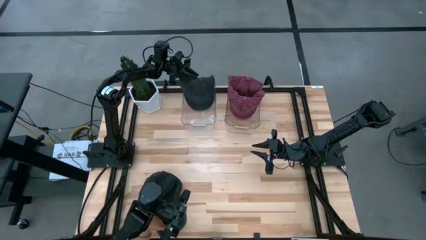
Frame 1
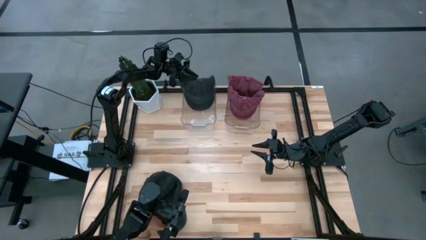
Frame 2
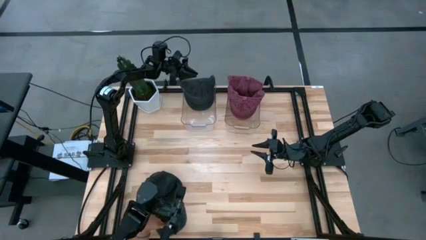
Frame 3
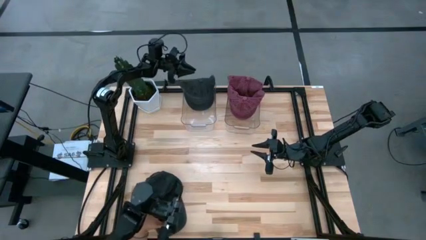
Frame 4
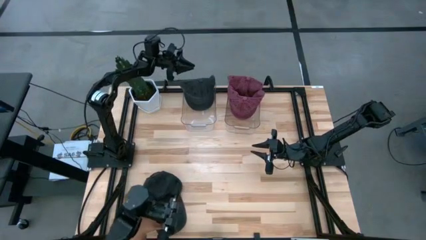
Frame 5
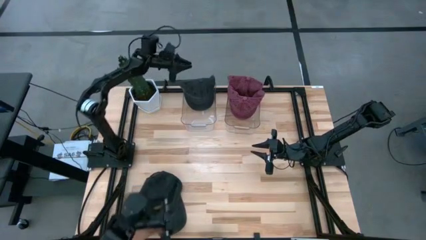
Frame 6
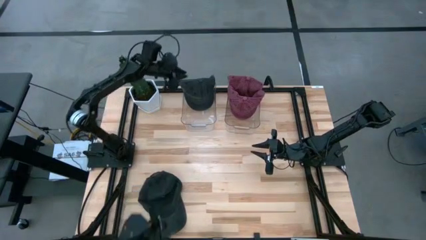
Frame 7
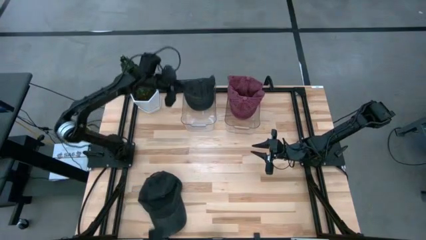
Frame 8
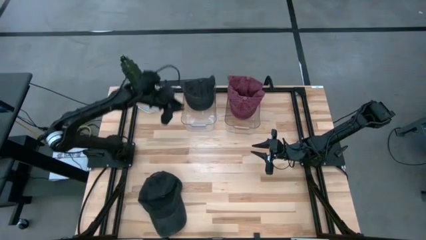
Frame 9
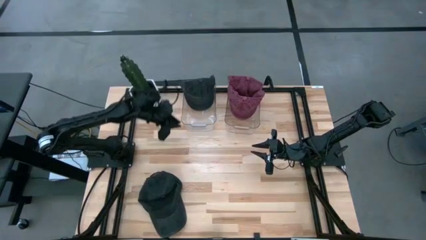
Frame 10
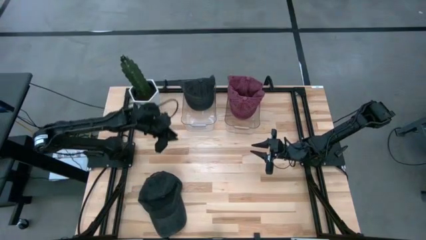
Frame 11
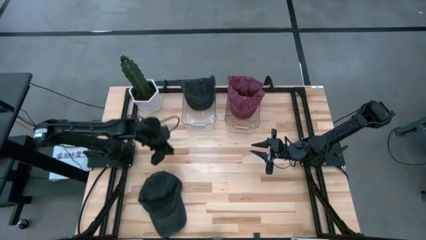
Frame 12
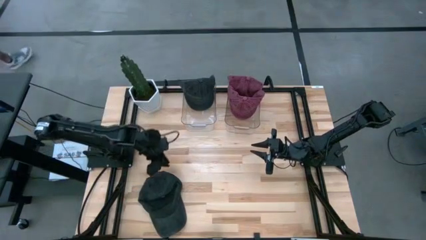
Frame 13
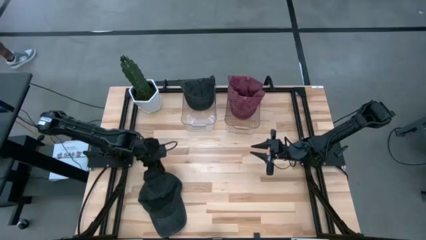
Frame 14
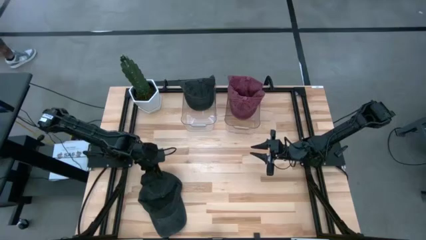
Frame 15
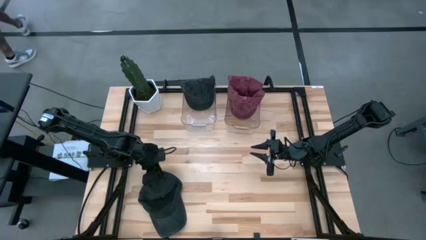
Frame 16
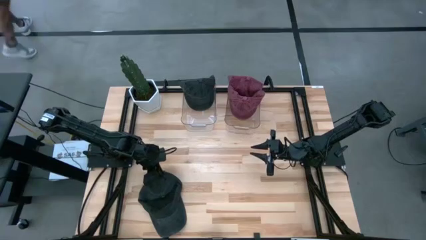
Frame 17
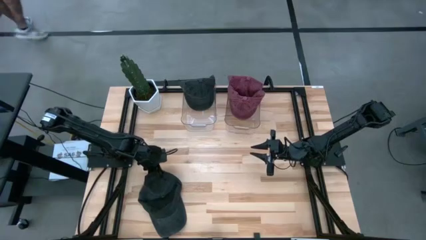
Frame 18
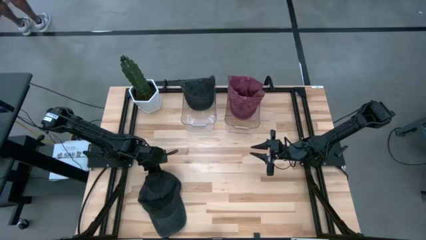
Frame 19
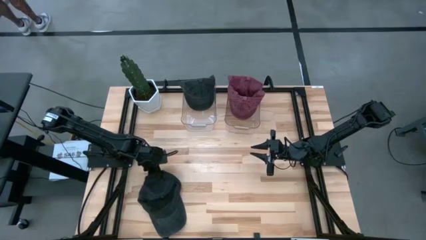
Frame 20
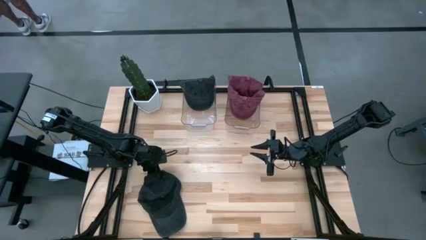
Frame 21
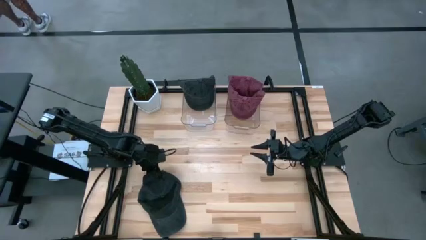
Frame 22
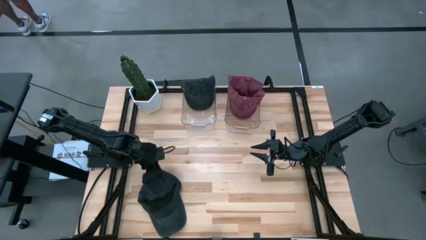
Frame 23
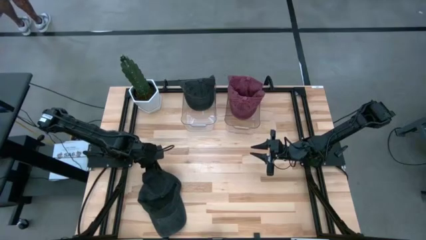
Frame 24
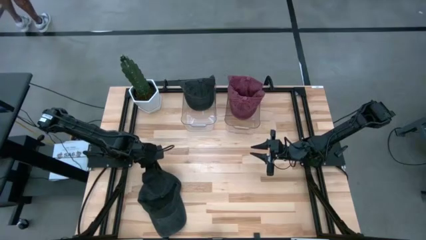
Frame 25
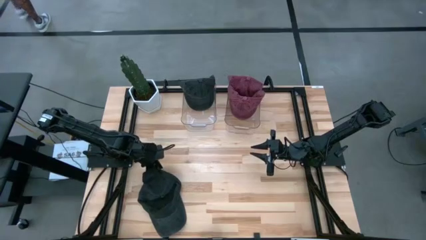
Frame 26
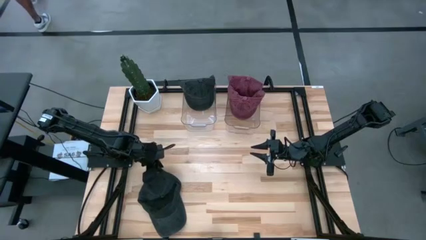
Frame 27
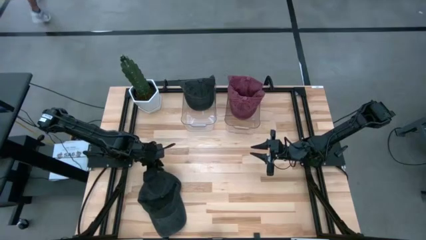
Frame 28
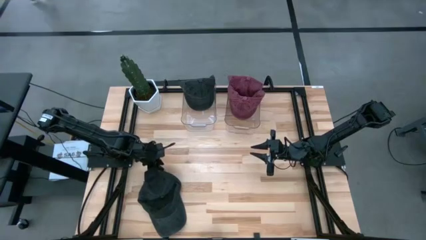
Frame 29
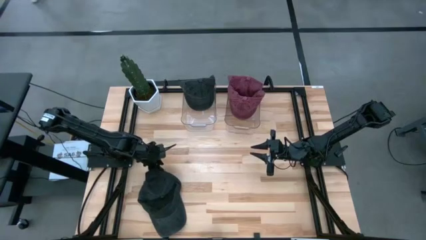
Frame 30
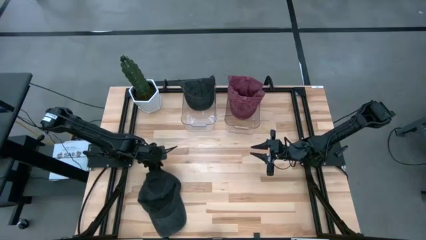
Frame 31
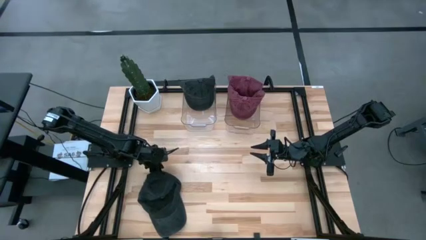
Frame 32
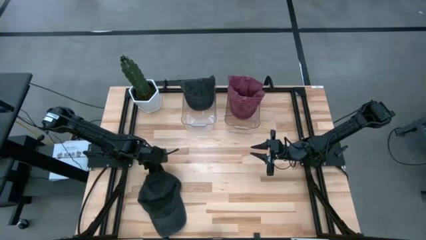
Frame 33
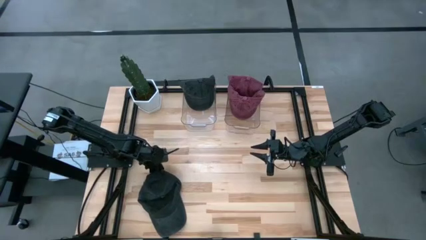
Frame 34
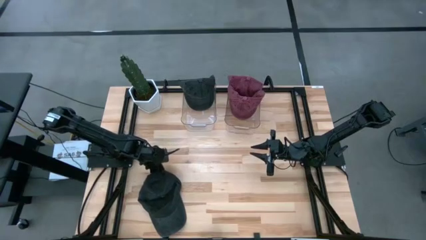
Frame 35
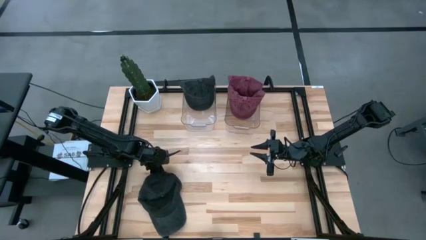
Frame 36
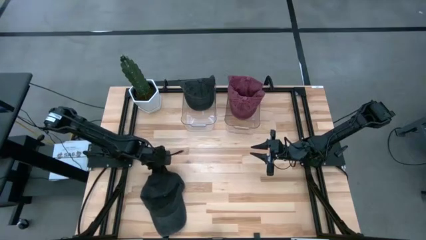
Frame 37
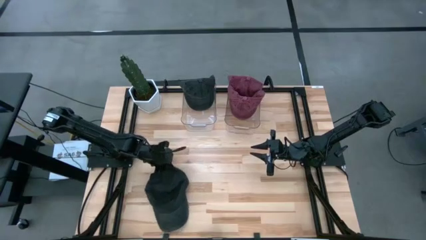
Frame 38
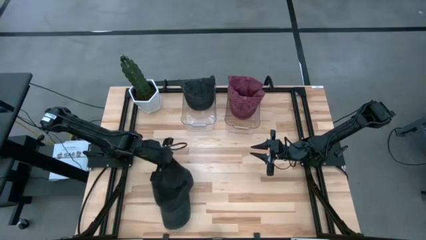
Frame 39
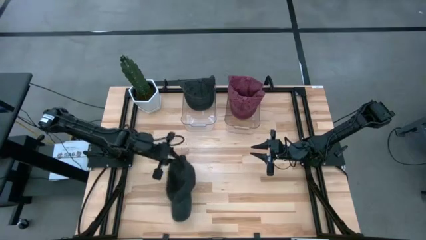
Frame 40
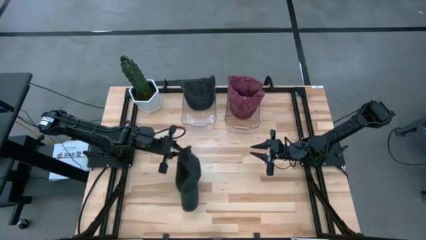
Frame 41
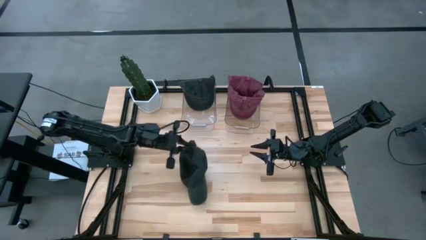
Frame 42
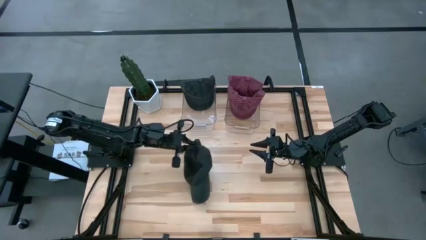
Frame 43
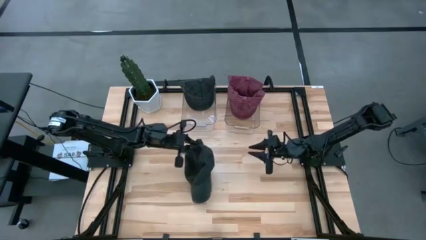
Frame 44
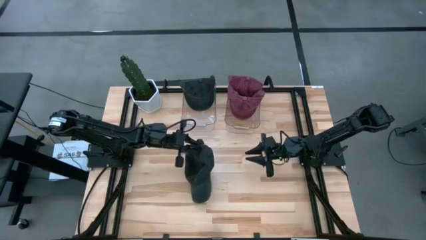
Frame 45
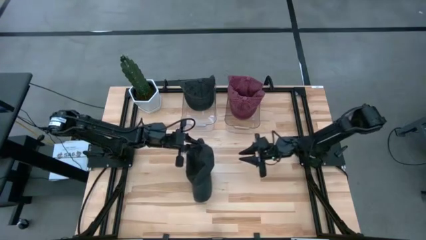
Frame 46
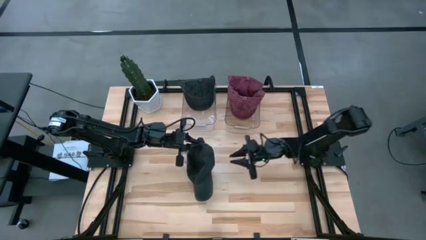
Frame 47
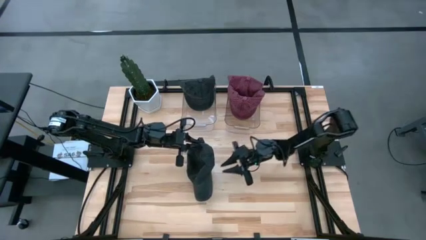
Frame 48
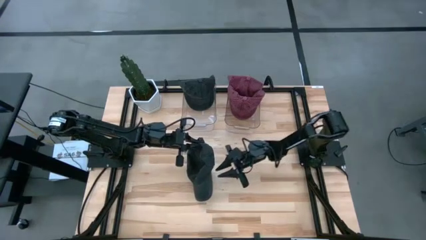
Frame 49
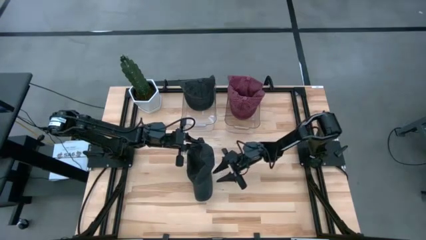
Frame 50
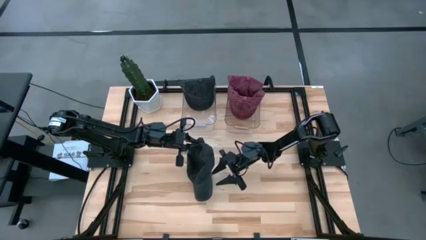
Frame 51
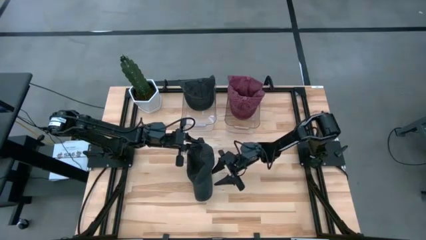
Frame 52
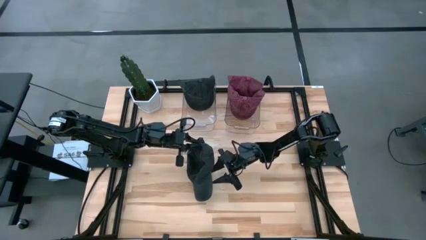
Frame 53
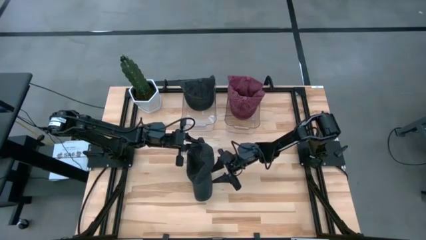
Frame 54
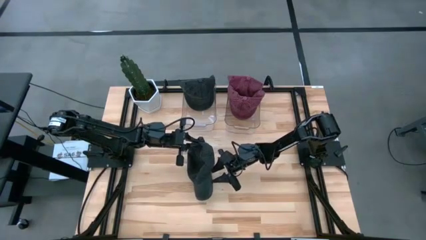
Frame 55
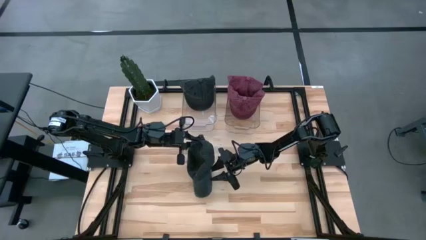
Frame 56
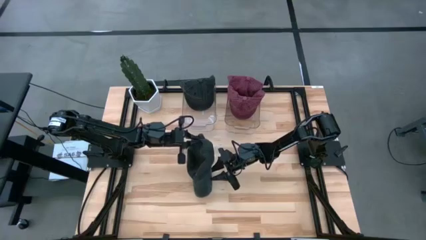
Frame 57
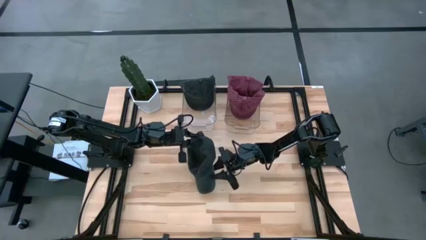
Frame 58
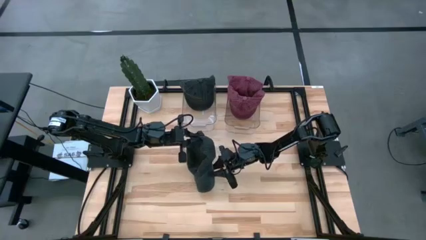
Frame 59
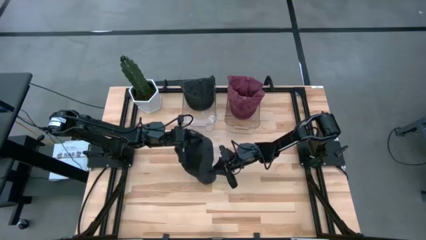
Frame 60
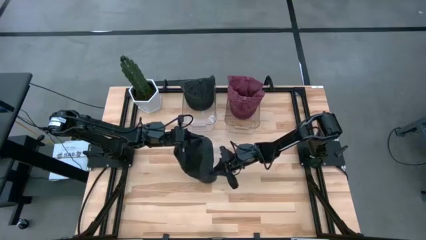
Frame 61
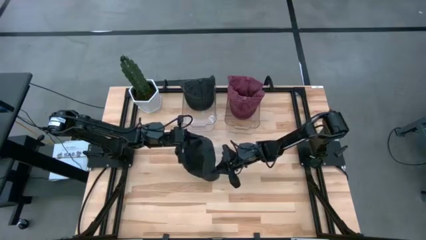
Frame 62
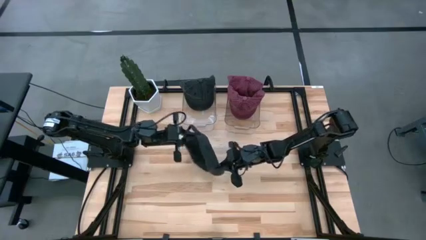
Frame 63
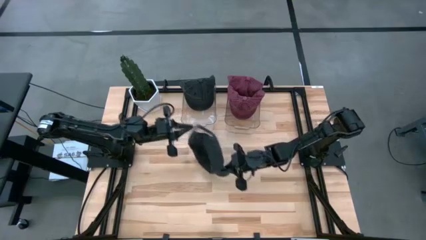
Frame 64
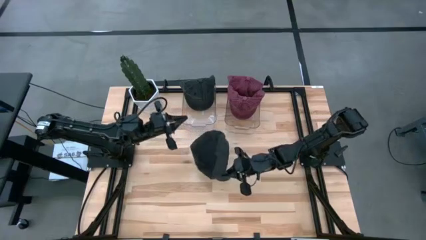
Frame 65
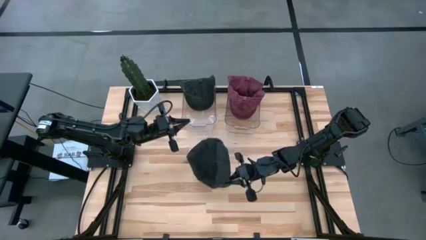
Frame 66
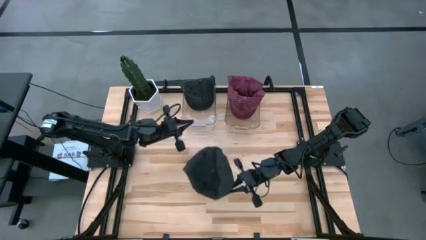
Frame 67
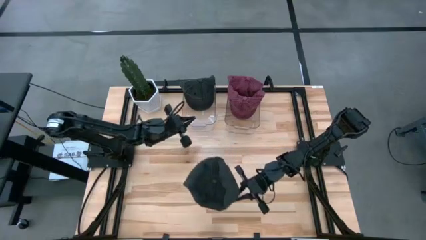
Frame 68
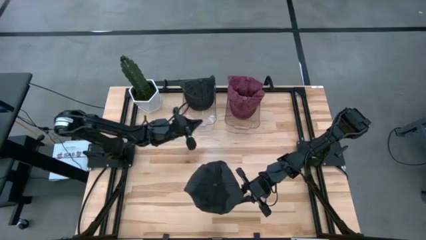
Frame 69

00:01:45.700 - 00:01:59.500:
Task: Pick & Place hat
Put the black head cap into the left transparent bin
